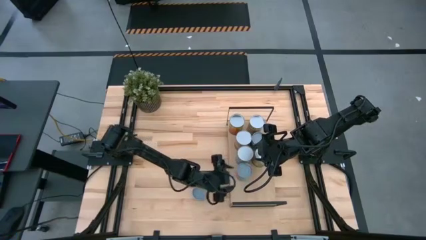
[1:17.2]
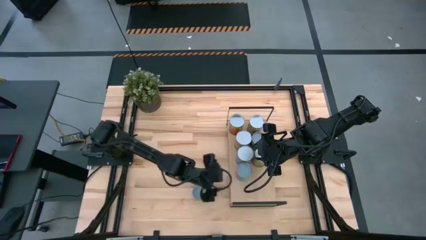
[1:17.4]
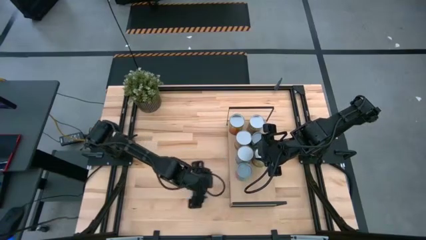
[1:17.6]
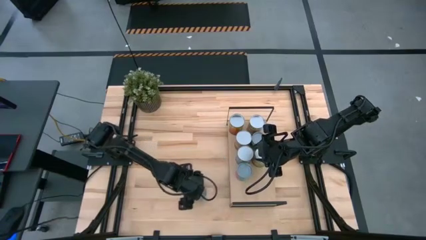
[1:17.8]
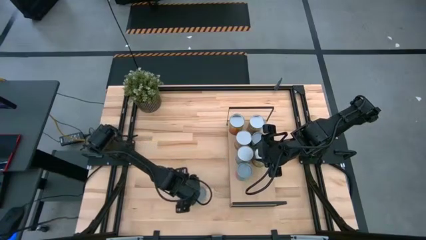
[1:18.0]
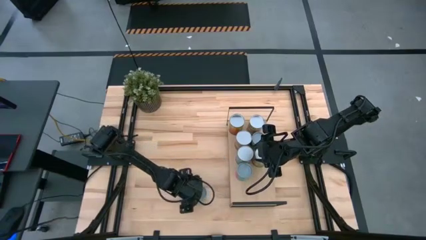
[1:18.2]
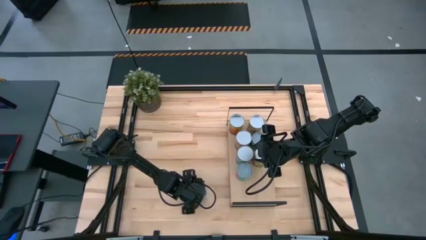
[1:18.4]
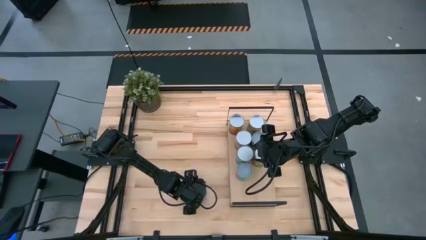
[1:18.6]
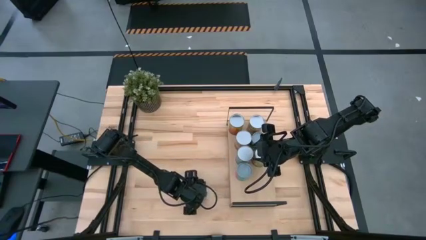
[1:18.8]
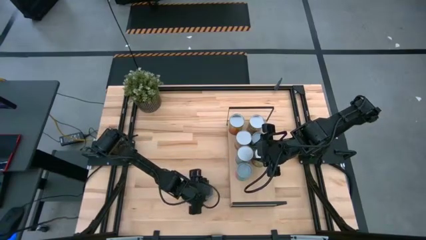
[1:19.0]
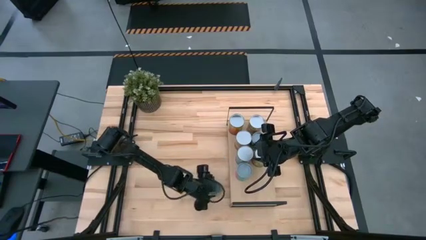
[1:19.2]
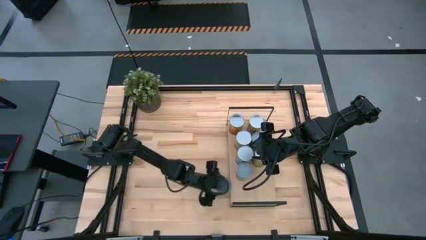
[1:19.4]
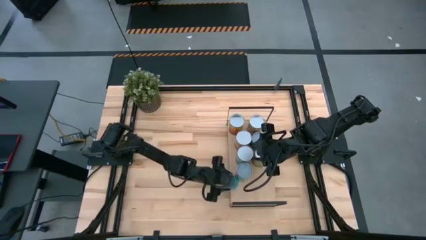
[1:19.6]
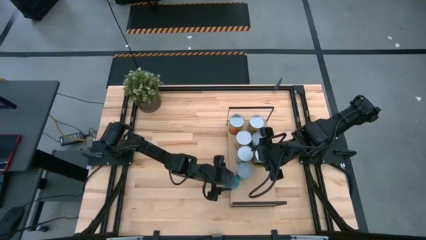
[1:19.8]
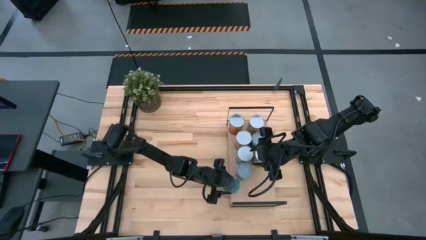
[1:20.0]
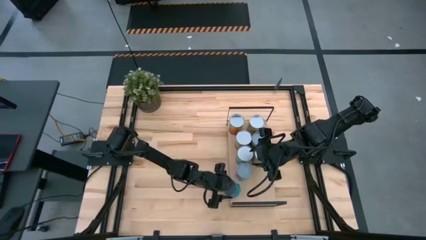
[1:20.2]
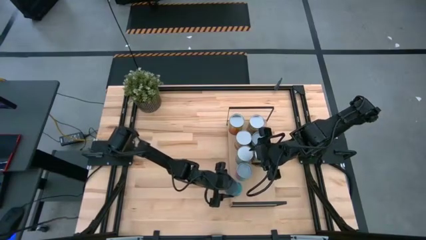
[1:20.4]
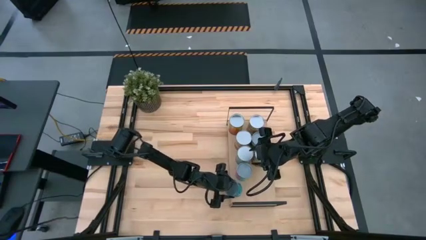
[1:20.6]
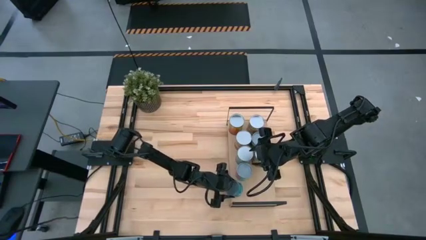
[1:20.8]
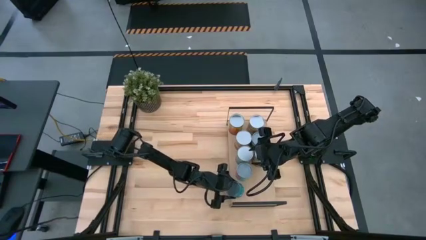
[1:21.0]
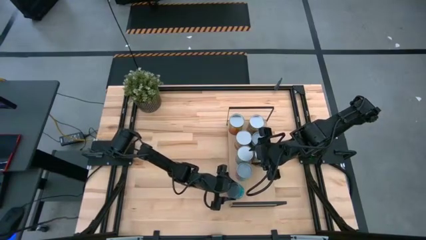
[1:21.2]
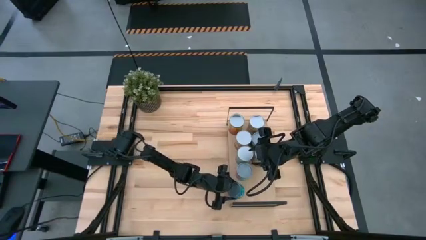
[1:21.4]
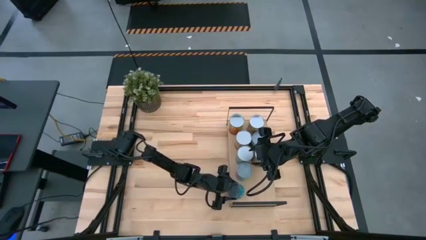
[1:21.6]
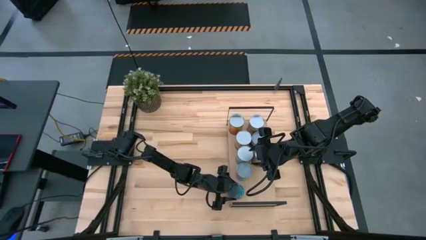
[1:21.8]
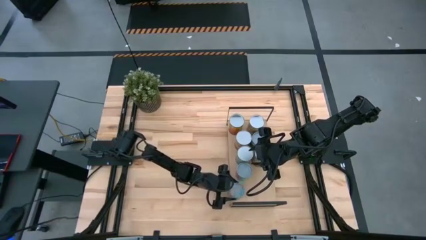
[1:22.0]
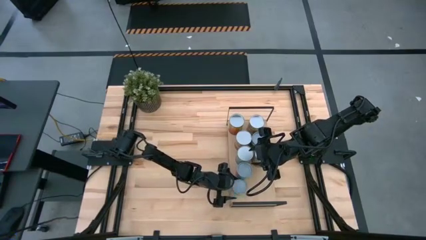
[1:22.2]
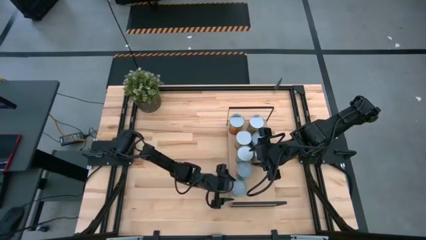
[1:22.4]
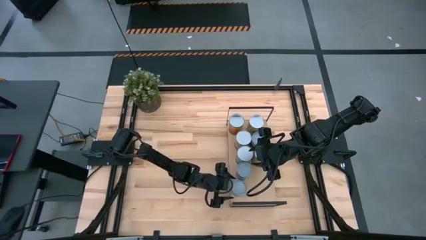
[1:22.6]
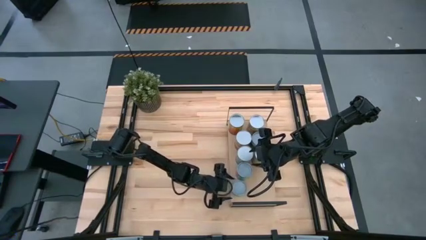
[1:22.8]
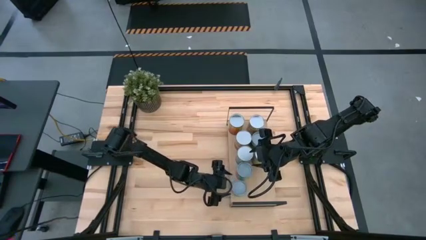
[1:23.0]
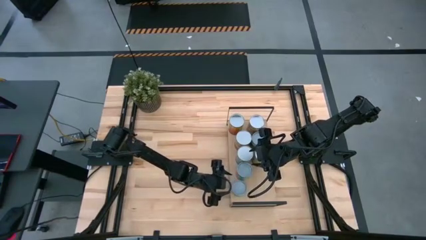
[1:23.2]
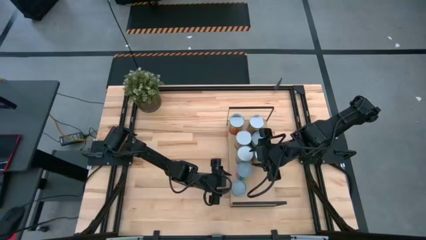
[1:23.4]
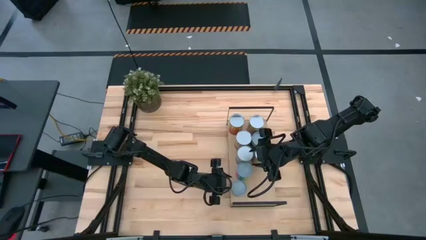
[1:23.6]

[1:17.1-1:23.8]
Task: Pick and place cans onto a shelf
Put the canned tuna on the shelf

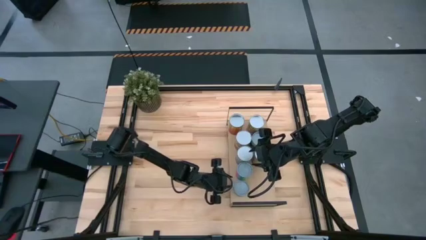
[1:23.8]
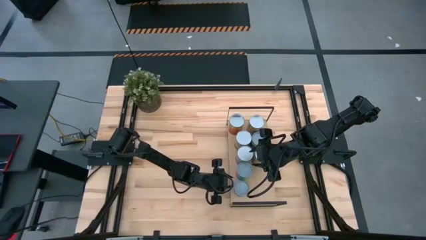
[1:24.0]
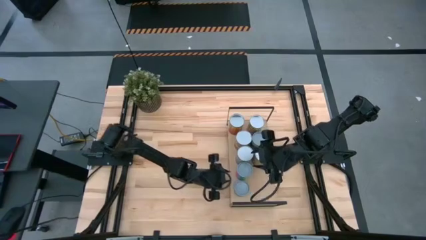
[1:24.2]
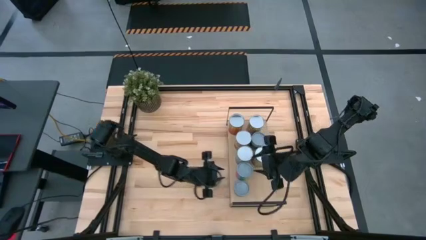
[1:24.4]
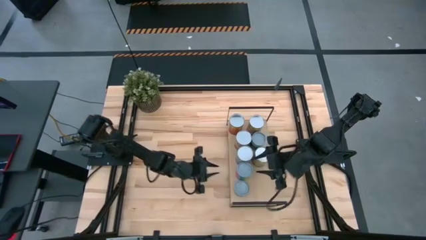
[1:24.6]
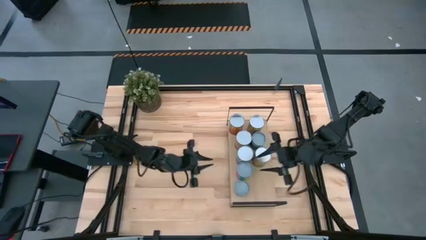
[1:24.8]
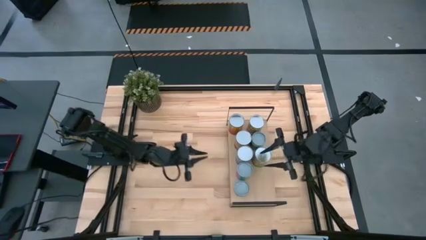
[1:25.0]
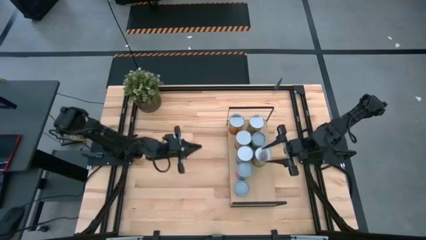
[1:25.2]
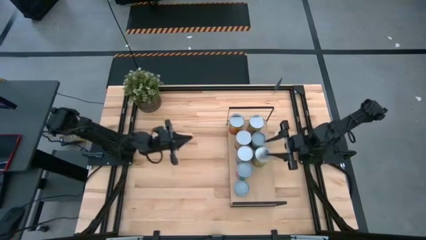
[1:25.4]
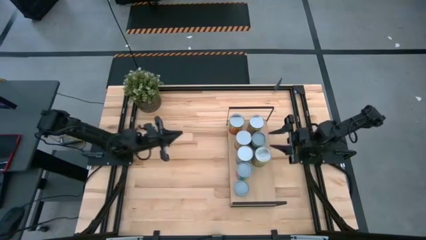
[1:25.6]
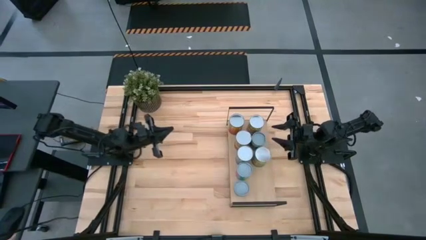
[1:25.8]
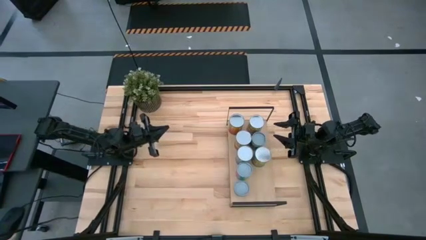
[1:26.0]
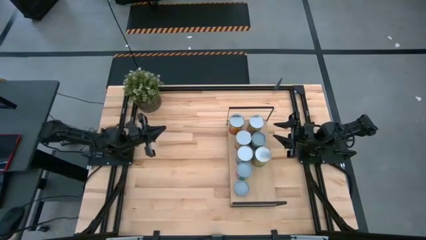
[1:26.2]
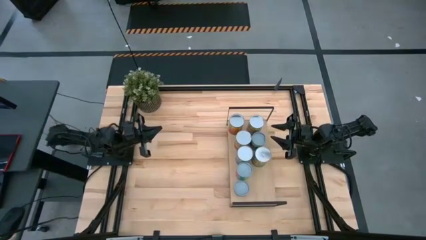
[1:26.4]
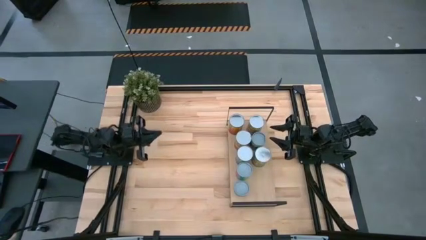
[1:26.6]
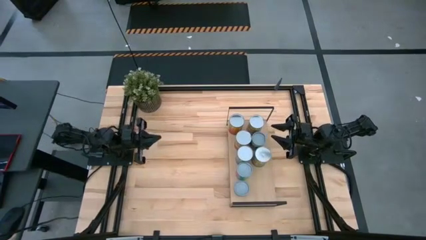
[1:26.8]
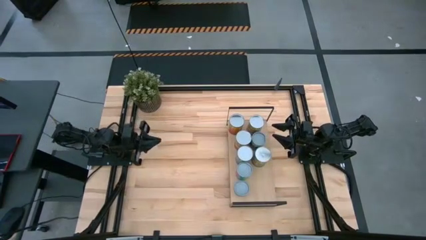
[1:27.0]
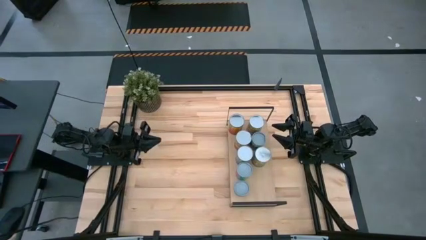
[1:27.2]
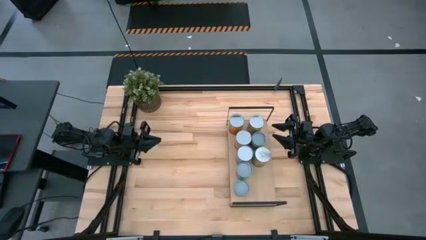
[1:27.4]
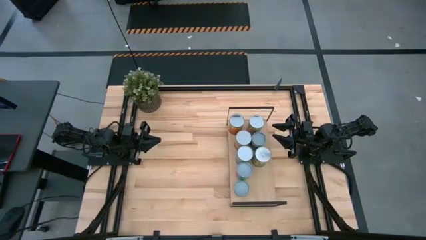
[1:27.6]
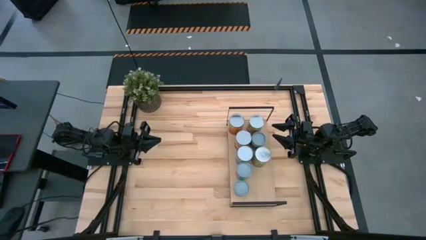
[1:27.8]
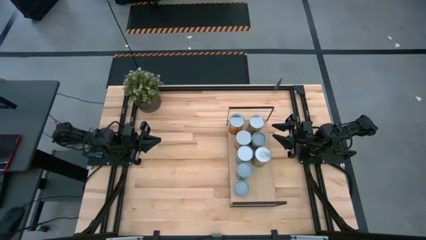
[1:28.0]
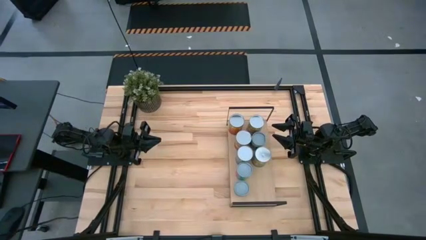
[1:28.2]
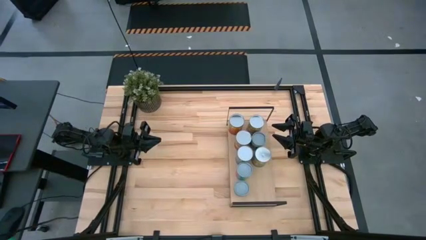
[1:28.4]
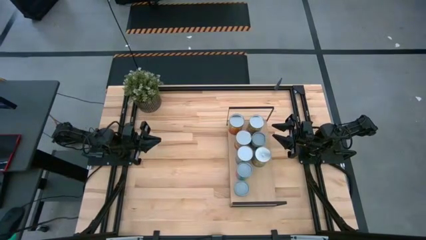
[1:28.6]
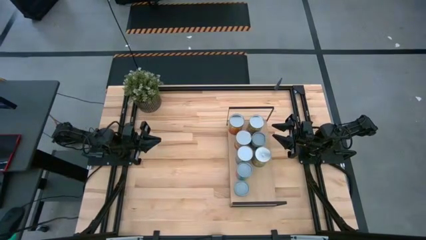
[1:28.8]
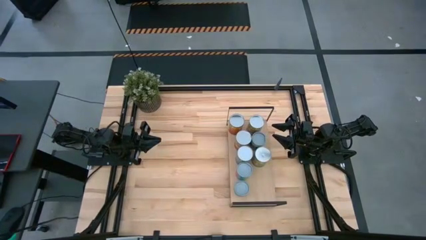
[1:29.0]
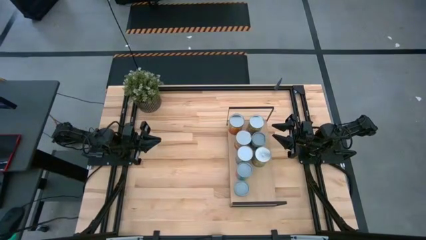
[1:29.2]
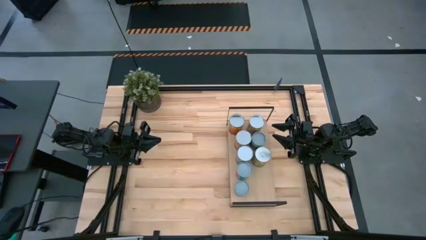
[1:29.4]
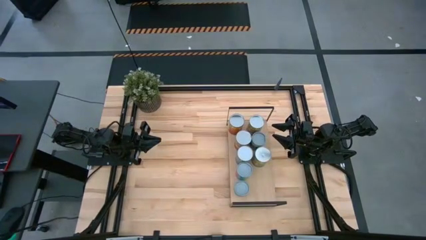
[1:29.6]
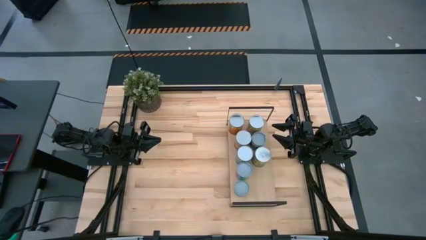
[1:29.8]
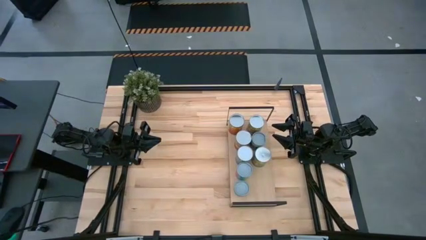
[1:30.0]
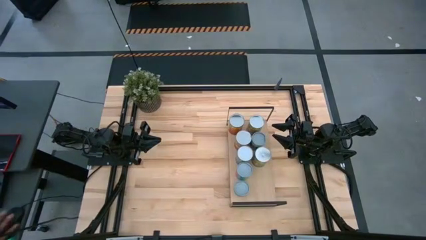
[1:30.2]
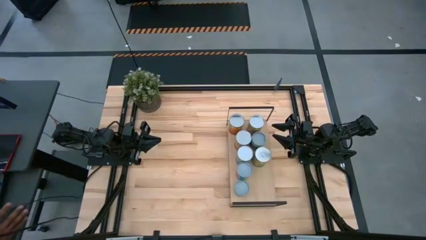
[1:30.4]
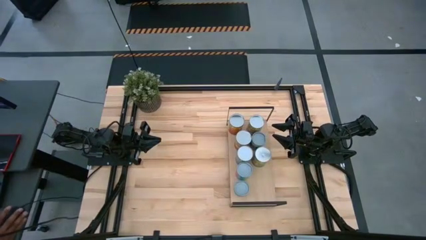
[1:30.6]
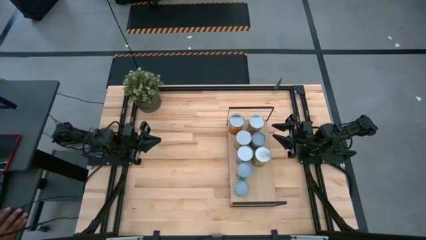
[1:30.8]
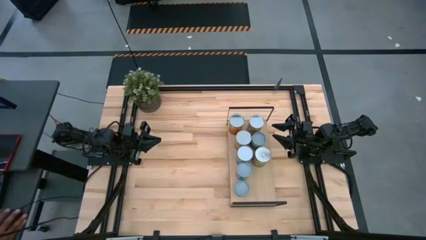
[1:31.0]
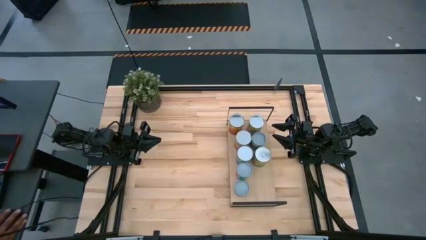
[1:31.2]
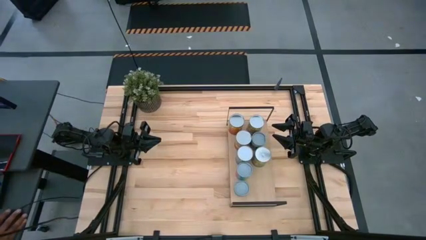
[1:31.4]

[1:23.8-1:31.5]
Return to Home Position
